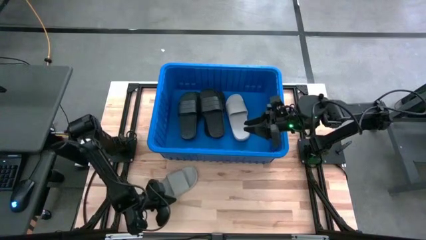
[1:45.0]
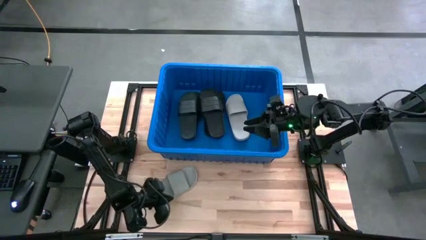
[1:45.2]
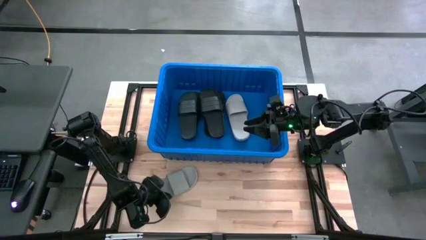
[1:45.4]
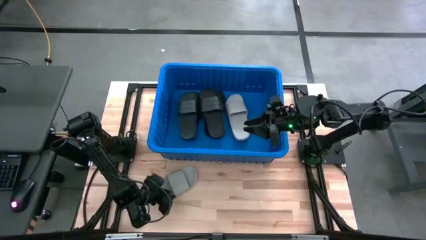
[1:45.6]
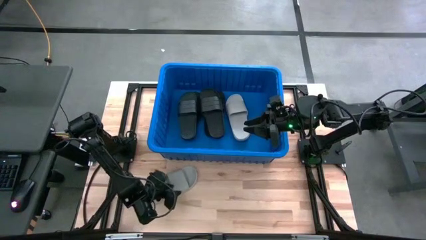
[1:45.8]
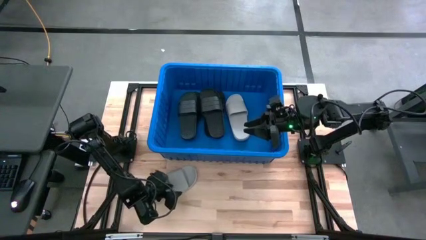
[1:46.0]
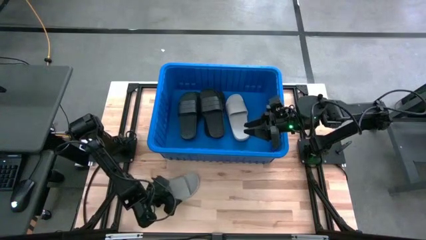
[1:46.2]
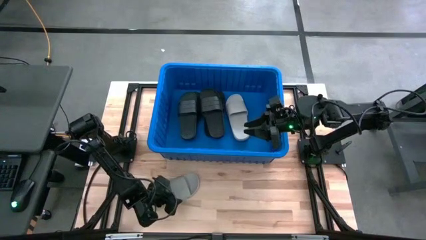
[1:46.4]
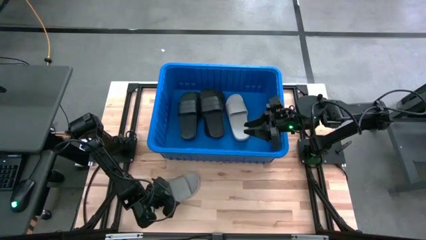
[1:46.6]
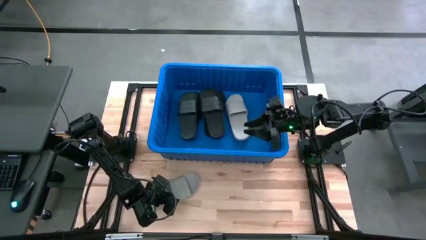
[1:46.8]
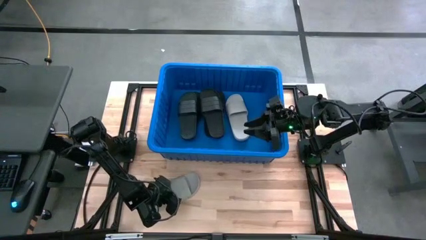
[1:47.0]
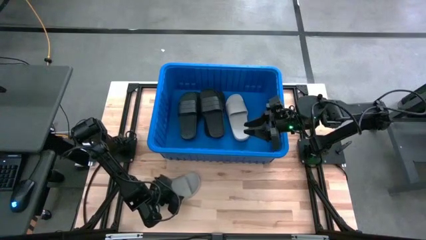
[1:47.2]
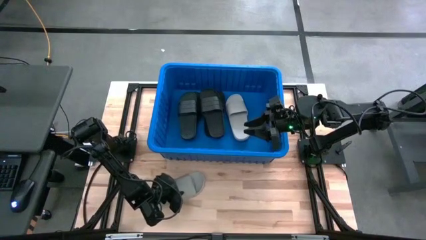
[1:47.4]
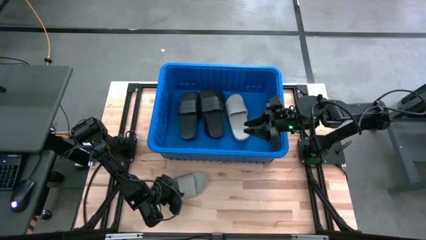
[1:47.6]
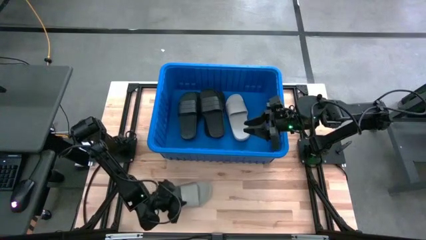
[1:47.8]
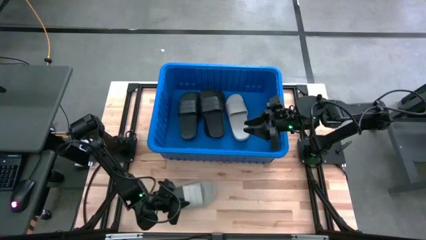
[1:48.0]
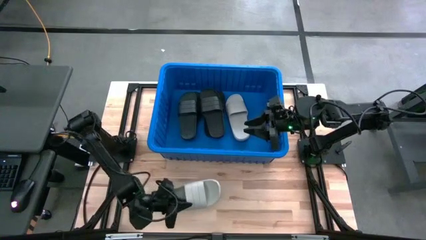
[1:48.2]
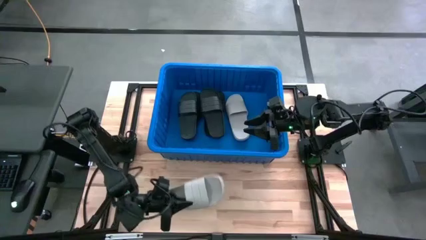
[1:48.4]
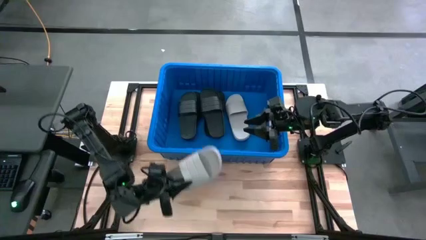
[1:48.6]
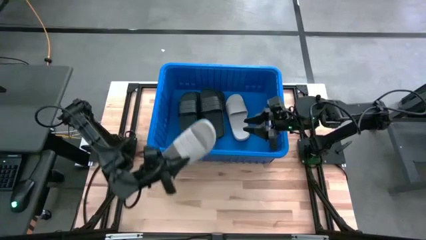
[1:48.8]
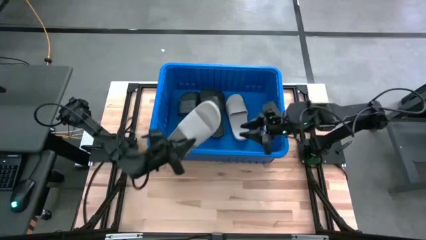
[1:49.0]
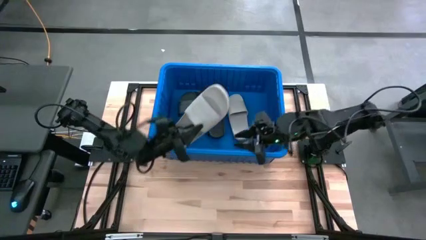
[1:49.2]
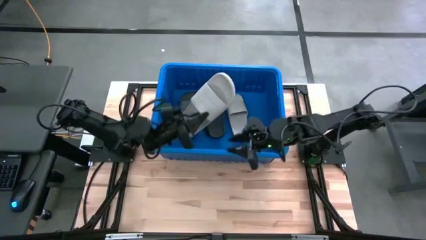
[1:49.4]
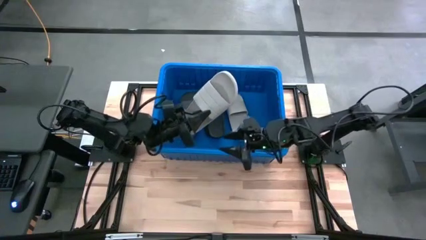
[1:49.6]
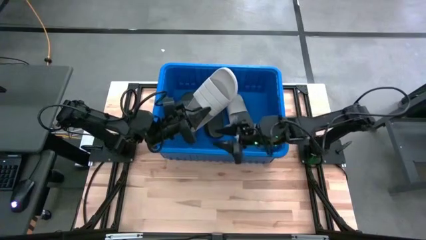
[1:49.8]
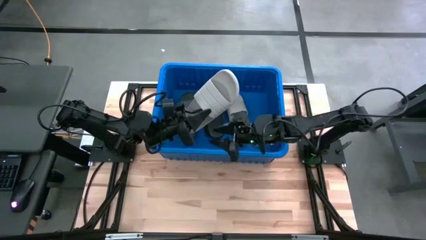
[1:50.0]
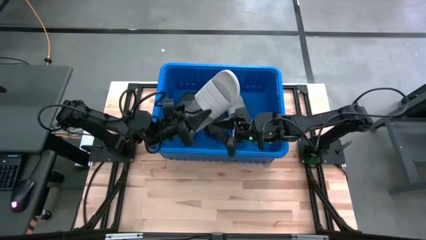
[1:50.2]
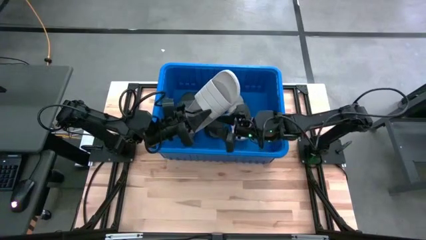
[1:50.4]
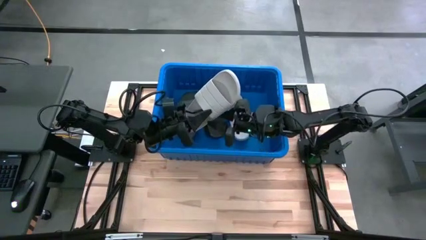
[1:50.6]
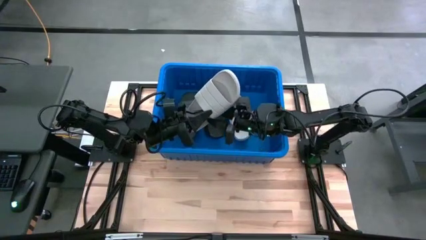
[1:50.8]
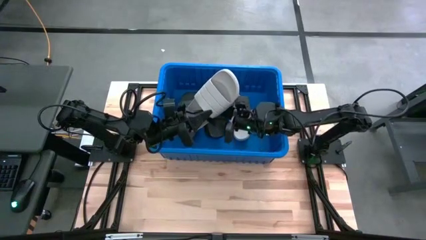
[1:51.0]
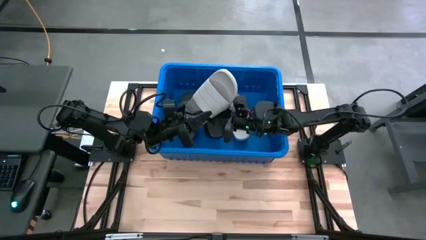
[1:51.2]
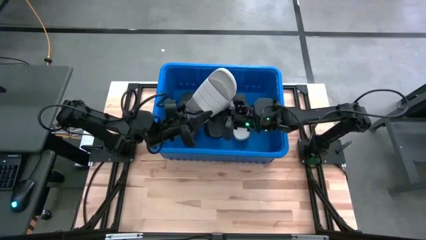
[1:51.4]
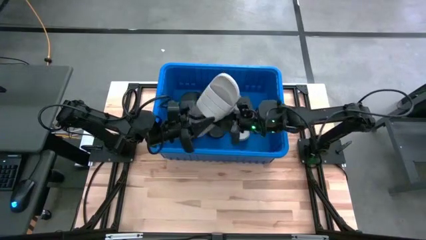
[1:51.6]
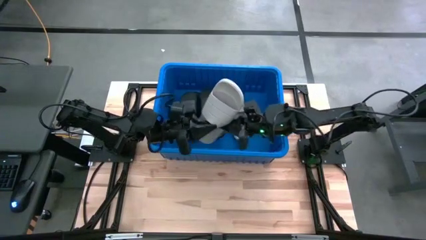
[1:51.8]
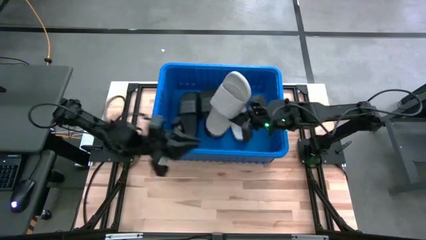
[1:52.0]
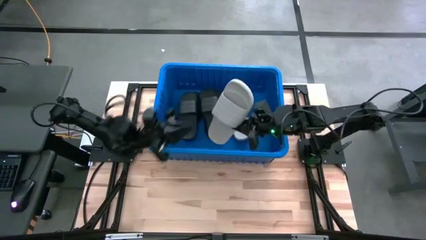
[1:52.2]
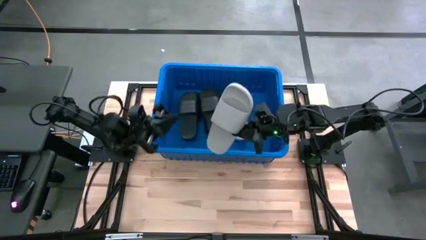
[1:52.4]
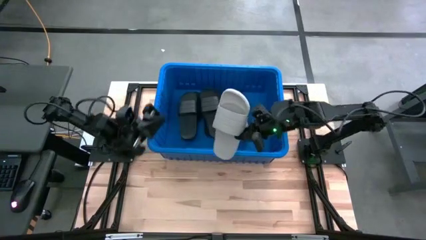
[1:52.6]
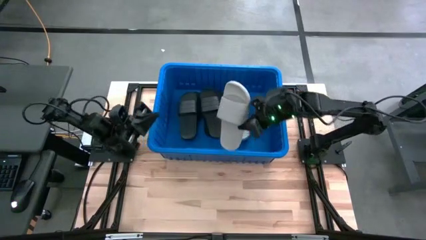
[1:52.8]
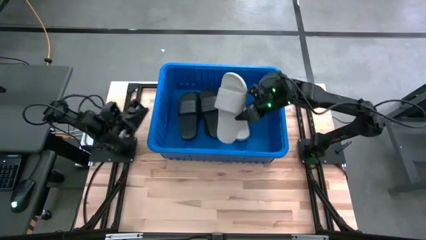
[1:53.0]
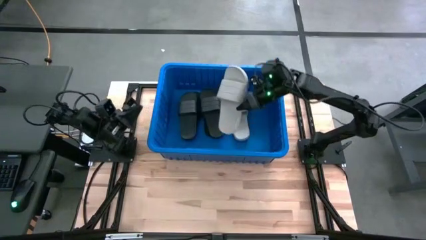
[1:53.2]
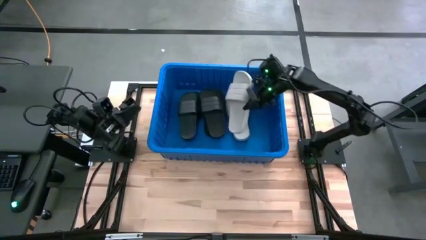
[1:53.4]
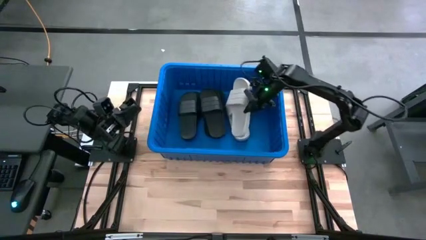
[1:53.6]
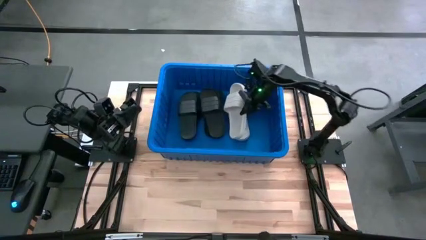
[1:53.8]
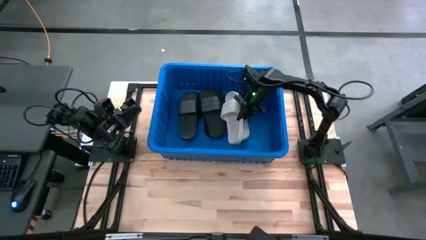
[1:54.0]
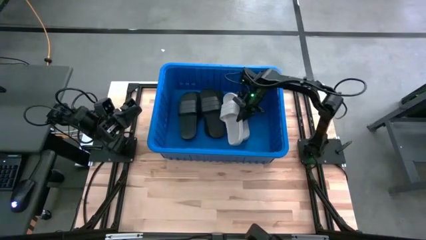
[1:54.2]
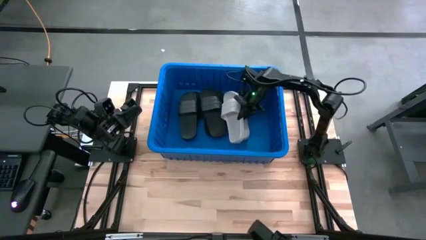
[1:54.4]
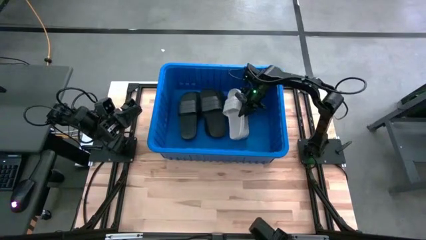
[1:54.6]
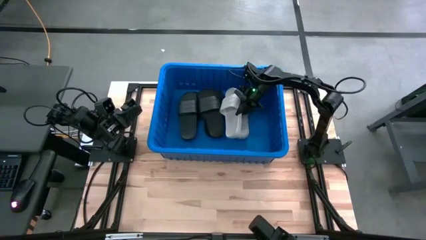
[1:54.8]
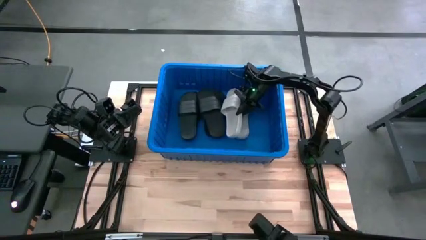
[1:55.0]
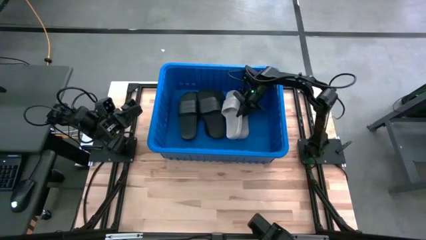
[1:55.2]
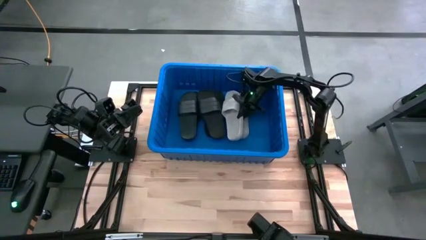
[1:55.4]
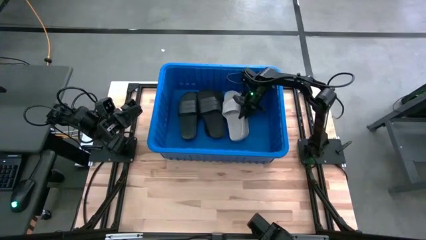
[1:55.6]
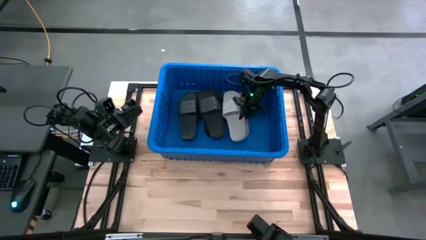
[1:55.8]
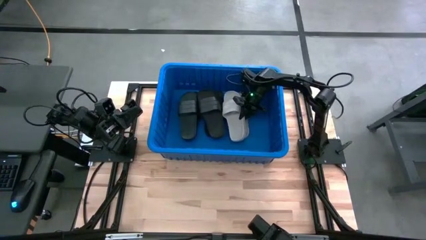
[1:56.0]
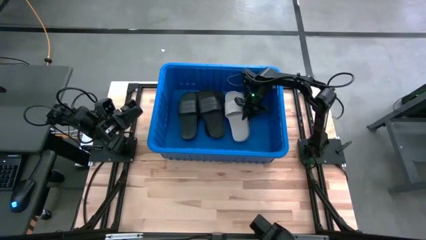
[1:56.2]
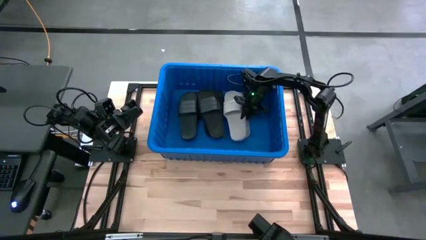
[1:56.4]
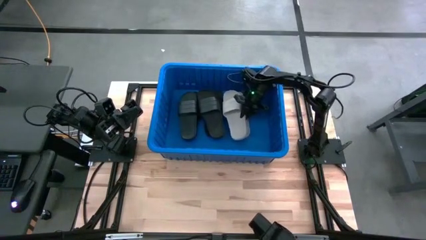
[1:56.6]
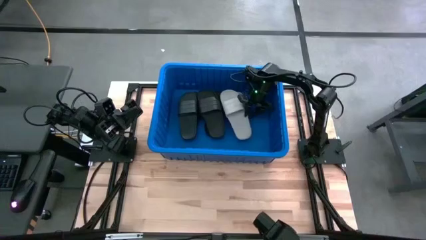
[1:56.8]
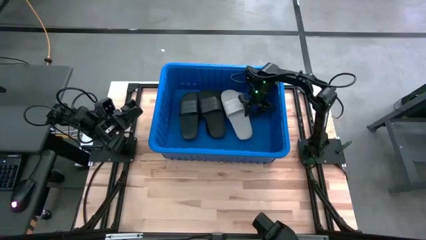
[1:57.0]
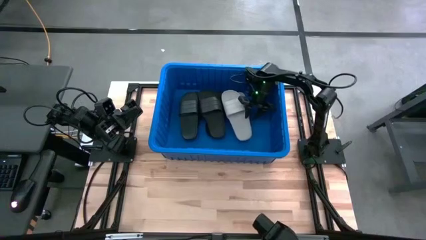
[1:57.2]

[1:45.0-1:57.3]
Task: Pick and place slides into bin
Put the gray slide into the blue bin

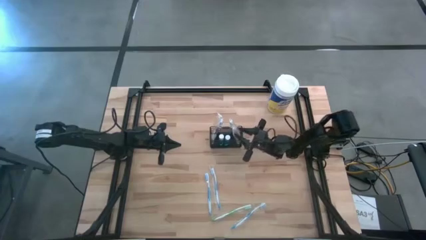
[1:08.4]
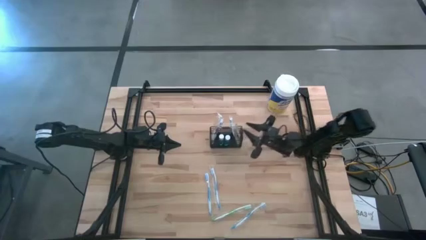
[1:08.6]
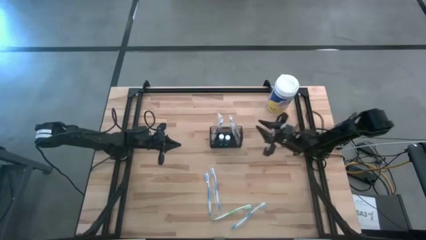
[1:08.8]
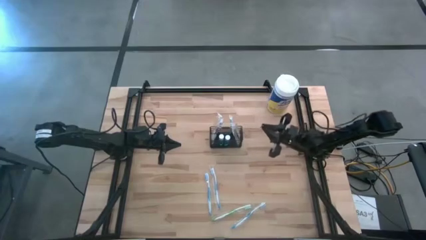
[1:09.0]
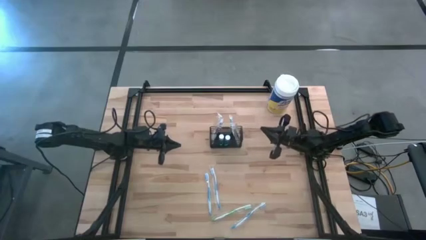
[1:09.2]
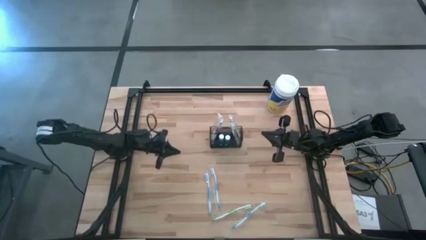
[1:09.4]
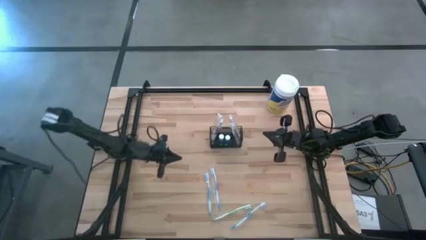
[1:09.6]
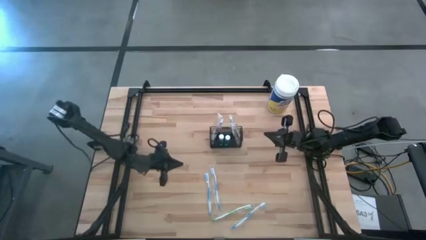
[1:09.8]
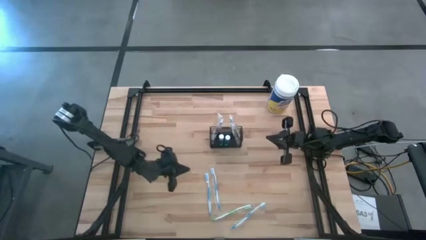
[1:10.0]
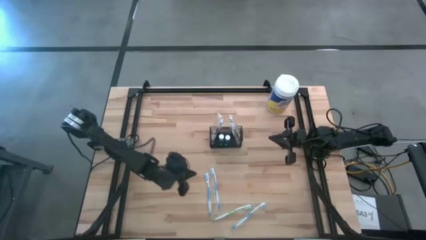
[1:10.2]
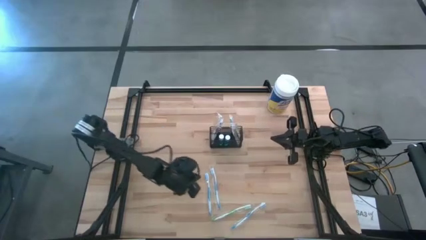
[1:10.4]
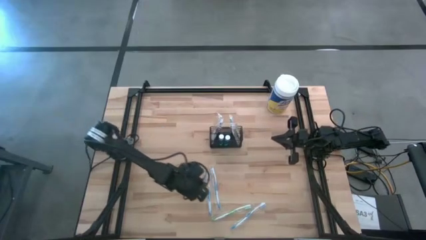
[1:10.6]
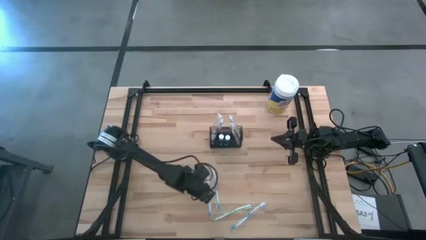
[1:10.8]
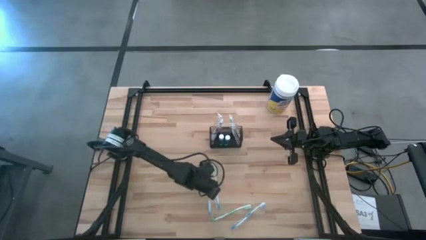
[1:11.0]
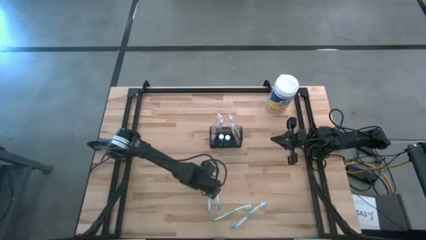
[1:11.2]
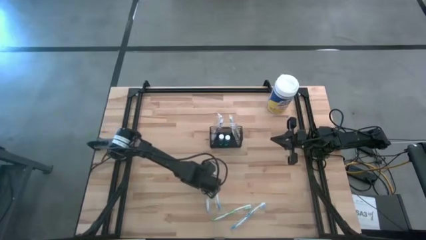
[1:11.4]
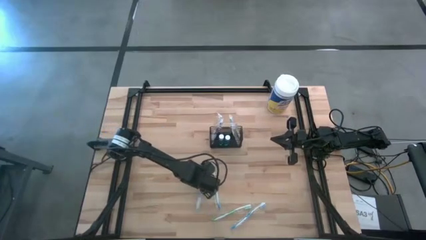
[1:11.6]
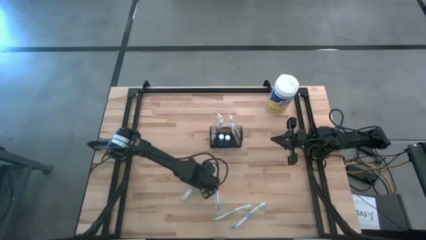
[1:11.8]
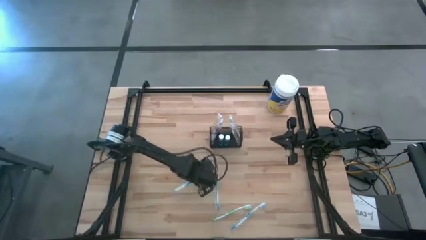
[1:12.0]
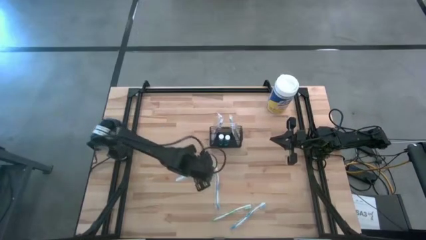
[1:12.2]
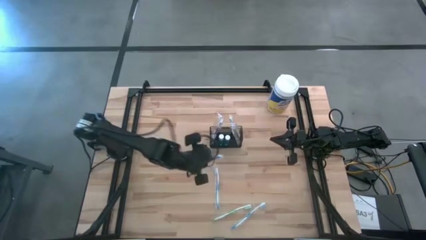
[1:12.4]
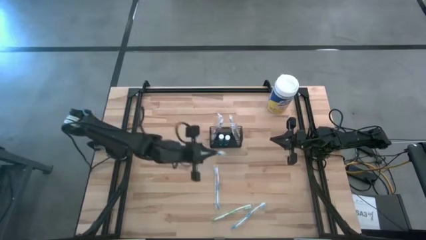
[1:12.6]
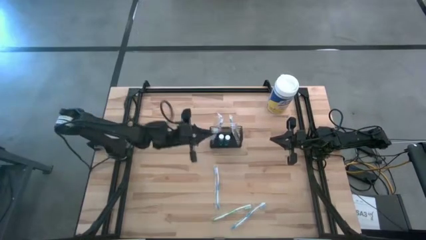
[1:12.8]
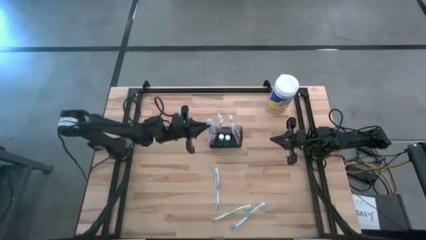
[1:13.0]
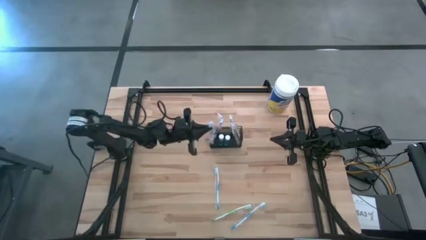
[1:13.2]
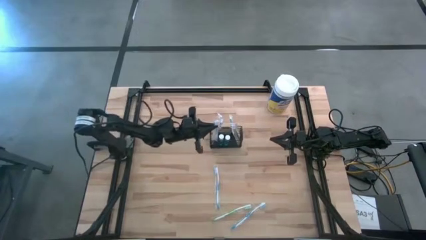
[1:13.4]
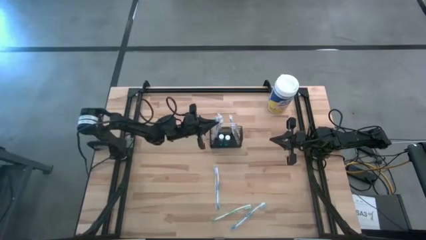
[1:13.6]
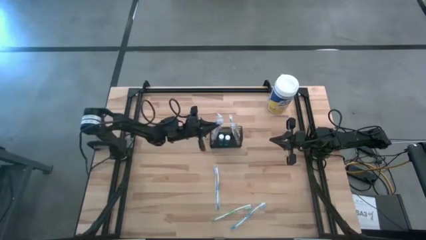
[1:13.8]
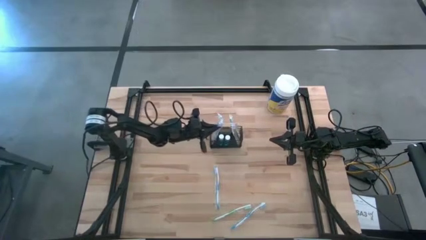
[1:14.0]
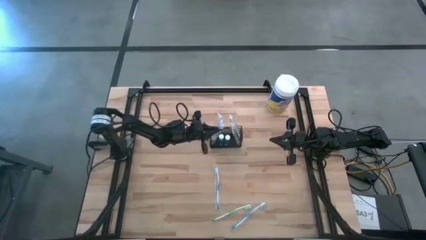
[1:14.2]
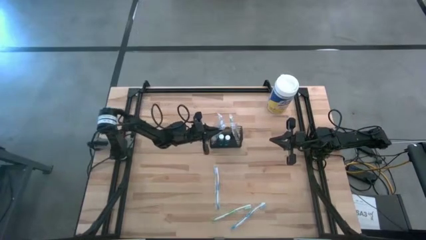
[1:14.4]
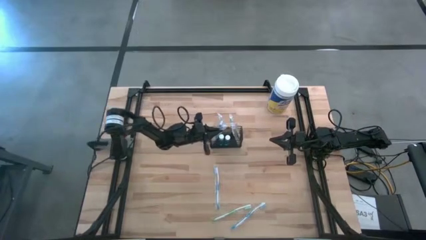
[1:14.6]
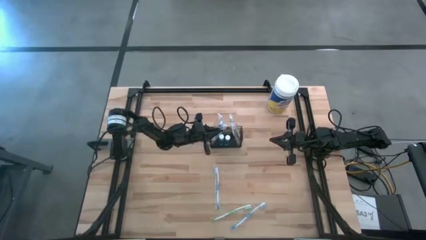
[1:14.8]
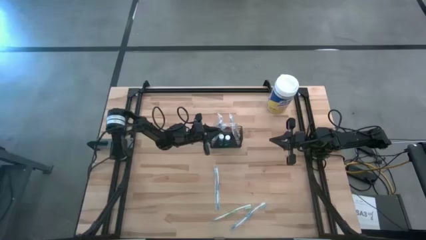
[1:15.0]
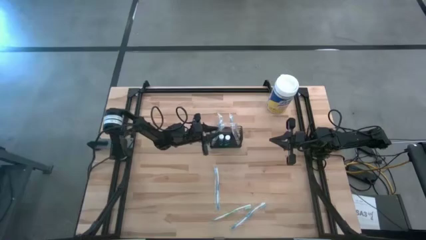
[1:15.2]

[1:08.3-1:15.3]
Task: Pick & Place toothbrushing station
Put the top left blue toothbrush into the black wire organizer
